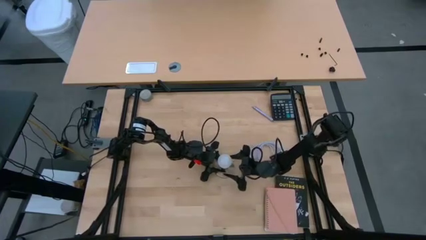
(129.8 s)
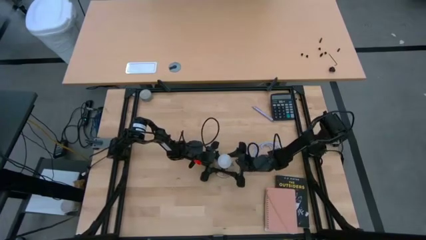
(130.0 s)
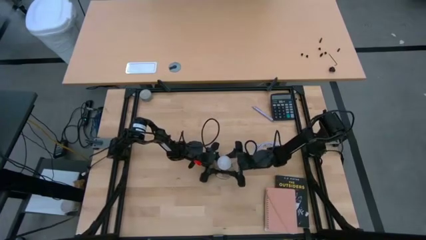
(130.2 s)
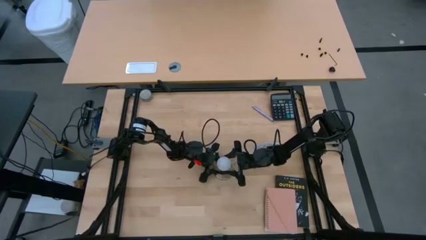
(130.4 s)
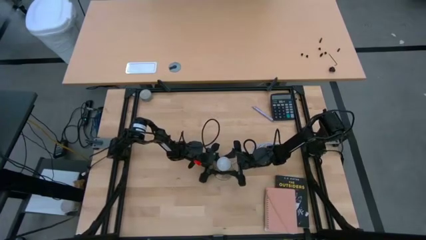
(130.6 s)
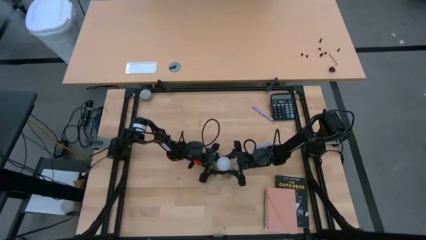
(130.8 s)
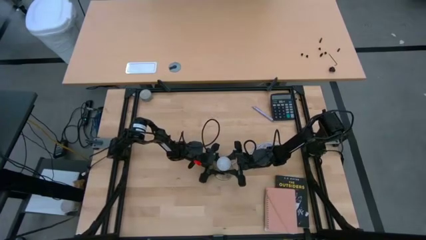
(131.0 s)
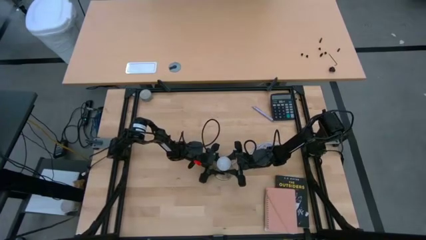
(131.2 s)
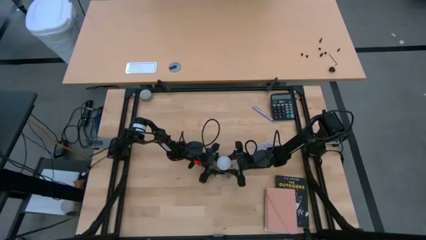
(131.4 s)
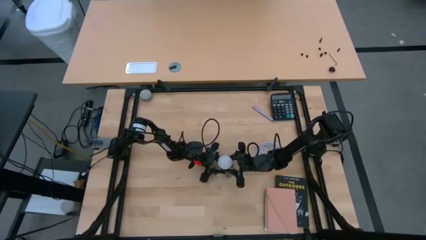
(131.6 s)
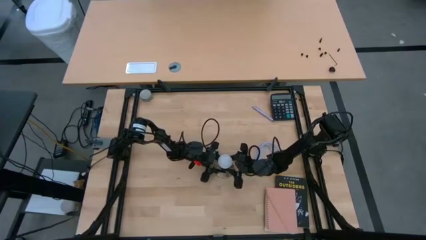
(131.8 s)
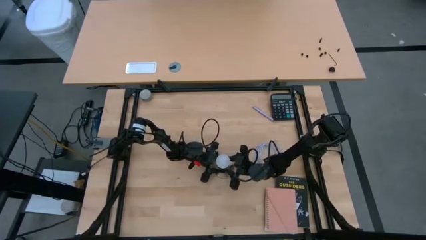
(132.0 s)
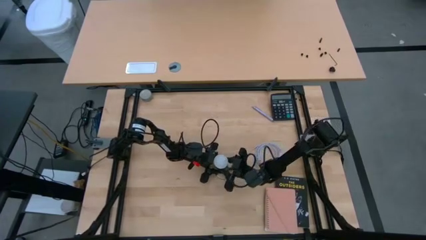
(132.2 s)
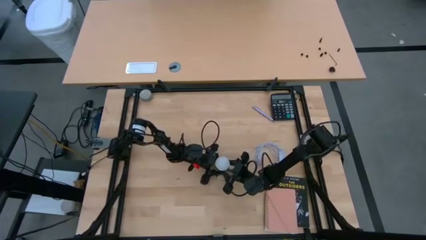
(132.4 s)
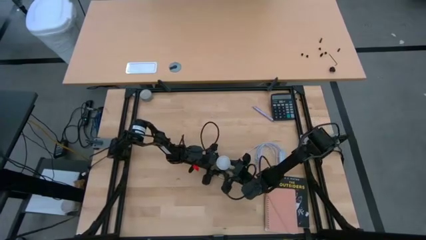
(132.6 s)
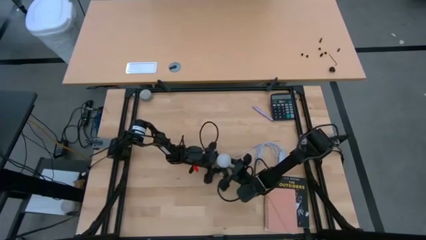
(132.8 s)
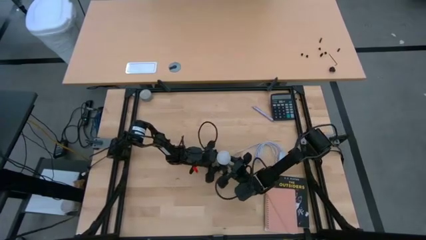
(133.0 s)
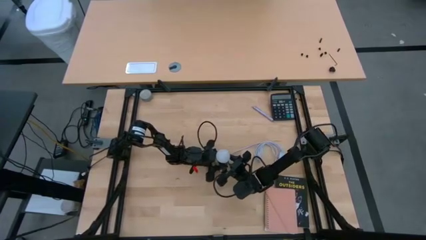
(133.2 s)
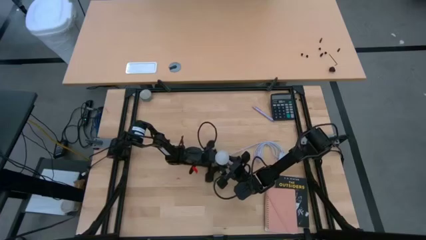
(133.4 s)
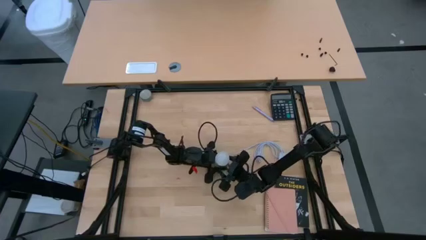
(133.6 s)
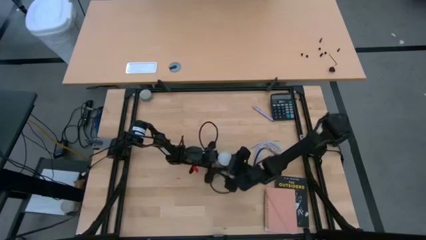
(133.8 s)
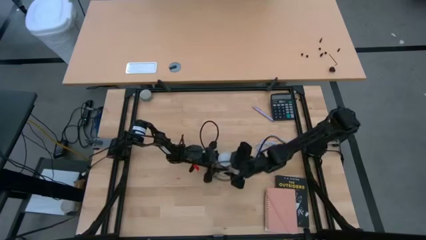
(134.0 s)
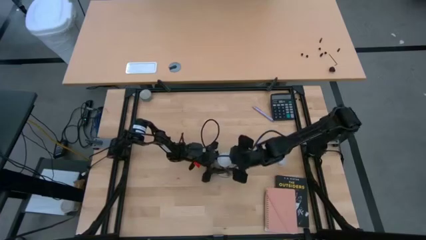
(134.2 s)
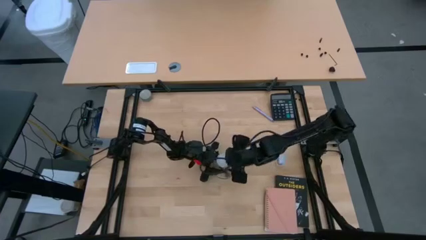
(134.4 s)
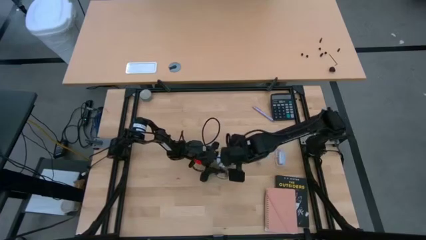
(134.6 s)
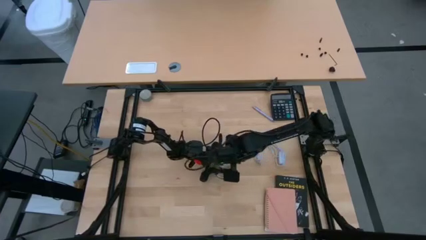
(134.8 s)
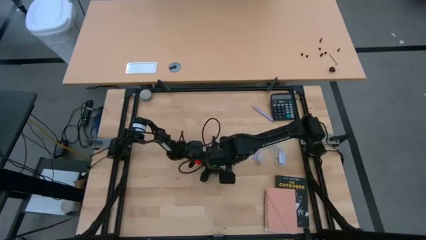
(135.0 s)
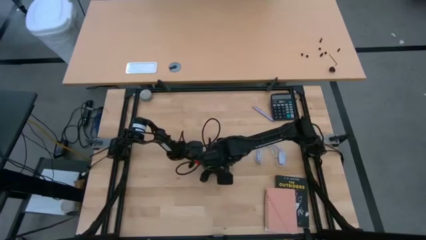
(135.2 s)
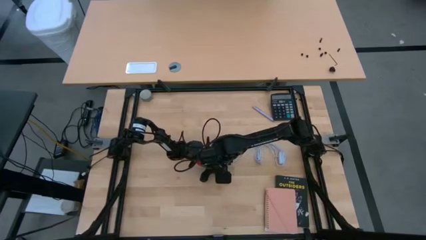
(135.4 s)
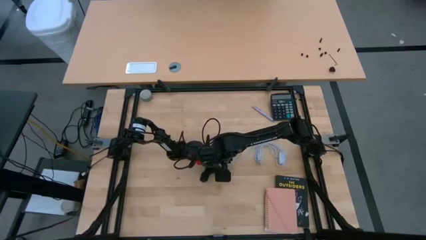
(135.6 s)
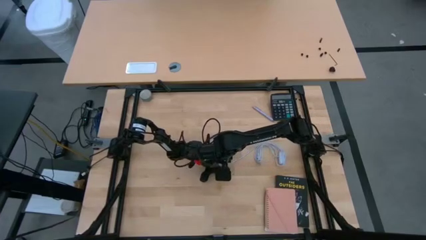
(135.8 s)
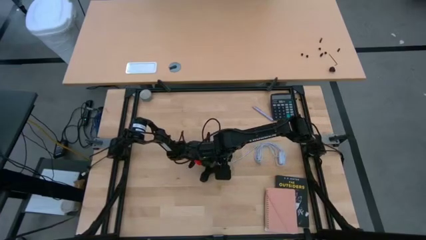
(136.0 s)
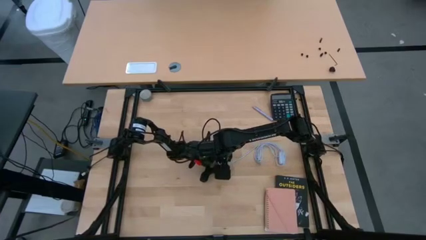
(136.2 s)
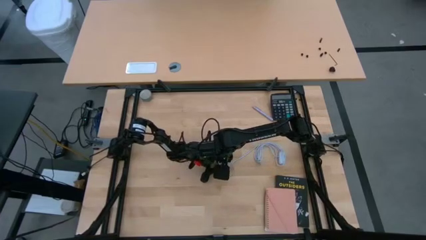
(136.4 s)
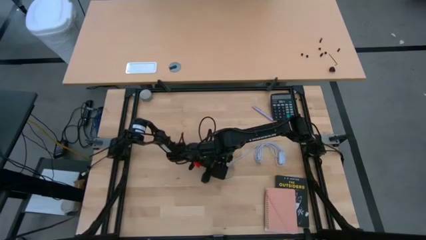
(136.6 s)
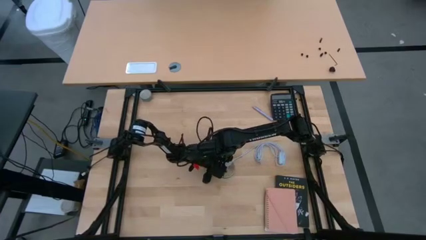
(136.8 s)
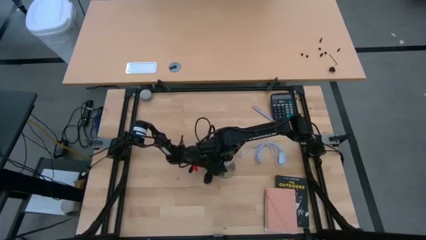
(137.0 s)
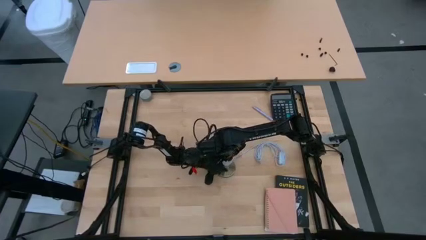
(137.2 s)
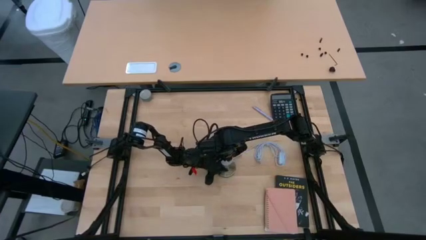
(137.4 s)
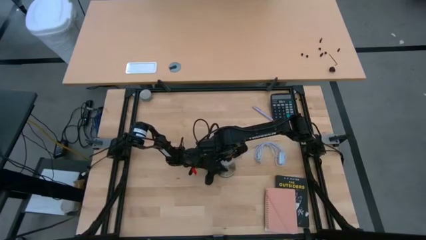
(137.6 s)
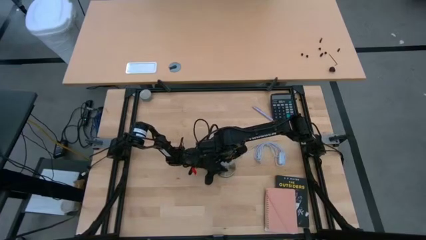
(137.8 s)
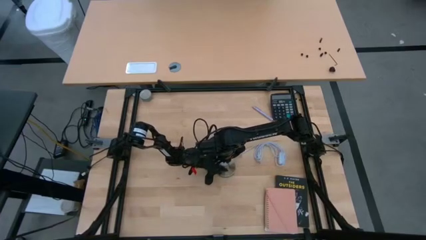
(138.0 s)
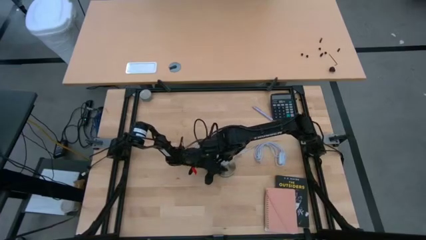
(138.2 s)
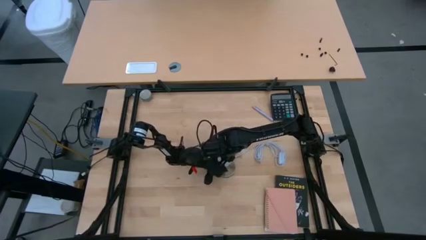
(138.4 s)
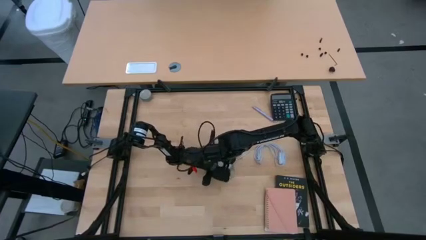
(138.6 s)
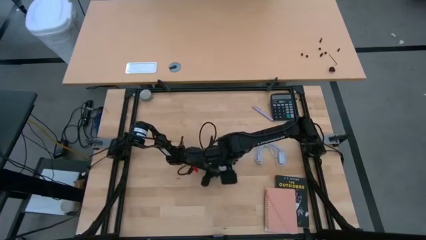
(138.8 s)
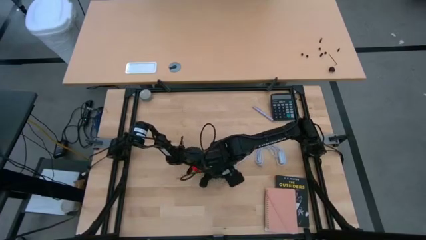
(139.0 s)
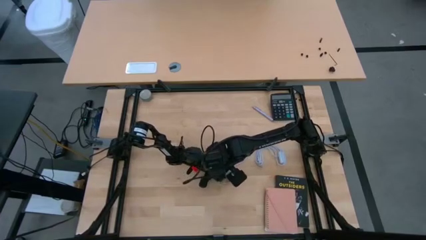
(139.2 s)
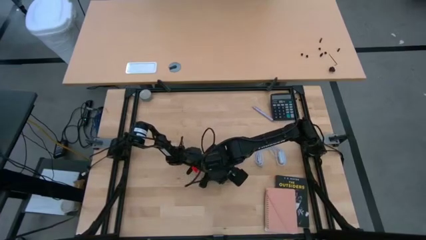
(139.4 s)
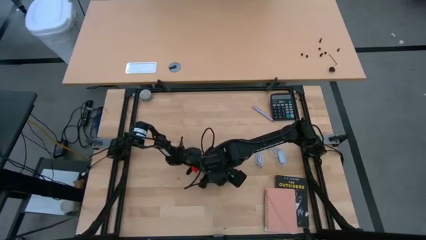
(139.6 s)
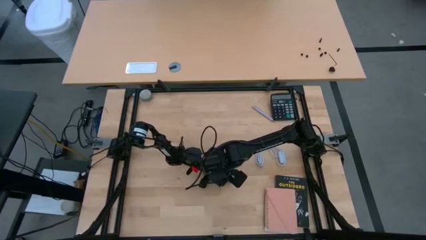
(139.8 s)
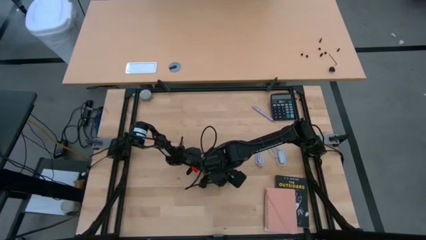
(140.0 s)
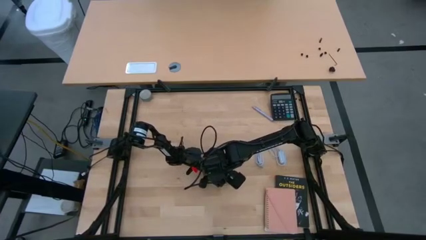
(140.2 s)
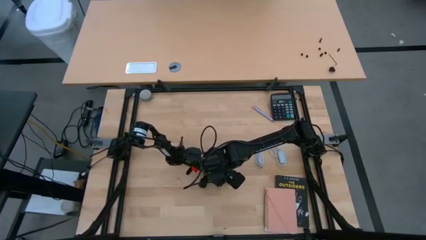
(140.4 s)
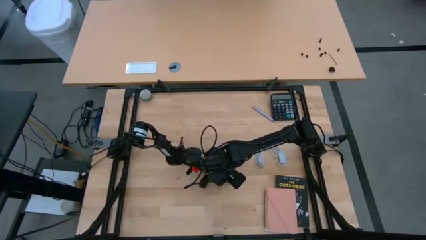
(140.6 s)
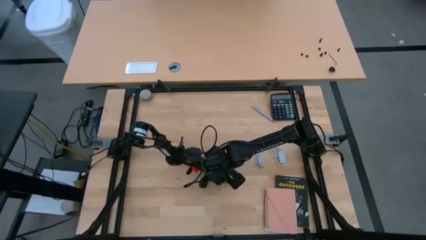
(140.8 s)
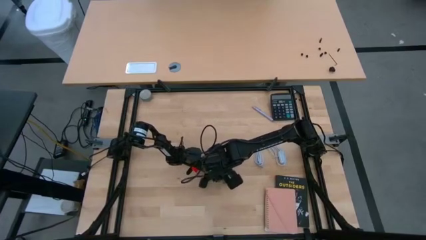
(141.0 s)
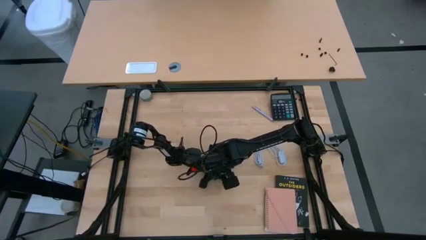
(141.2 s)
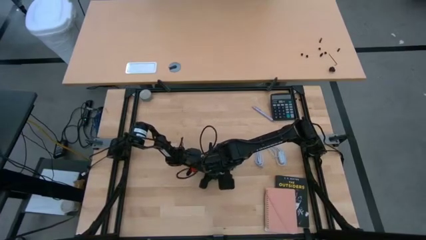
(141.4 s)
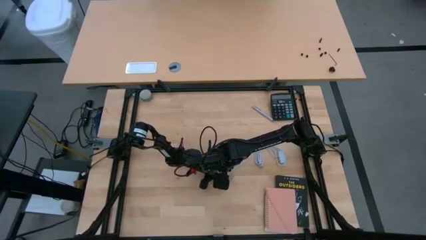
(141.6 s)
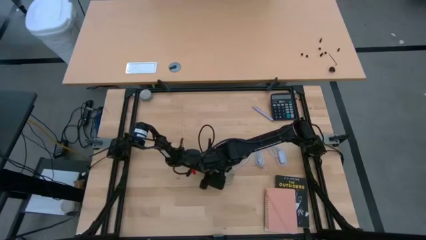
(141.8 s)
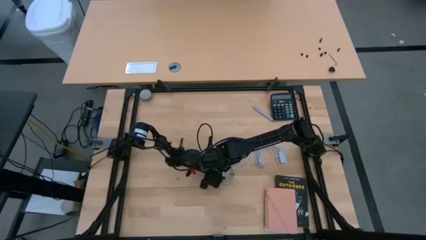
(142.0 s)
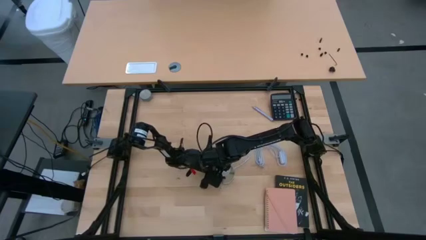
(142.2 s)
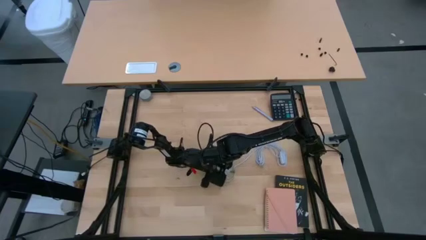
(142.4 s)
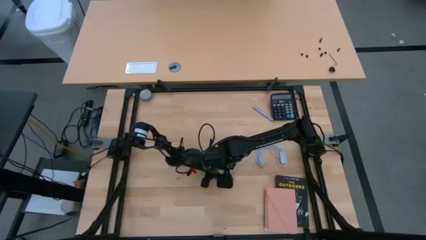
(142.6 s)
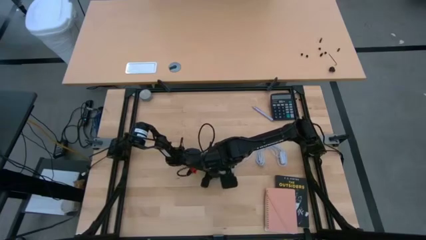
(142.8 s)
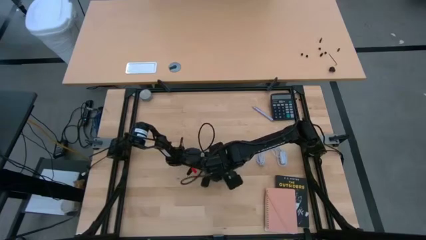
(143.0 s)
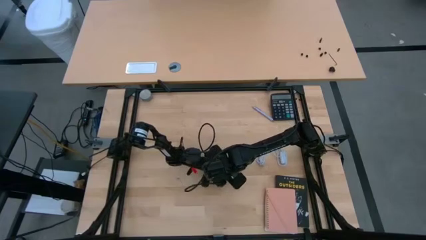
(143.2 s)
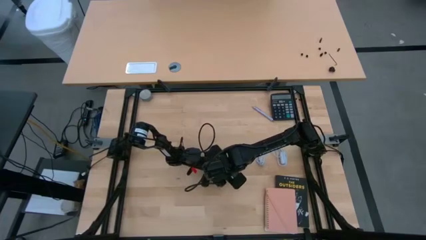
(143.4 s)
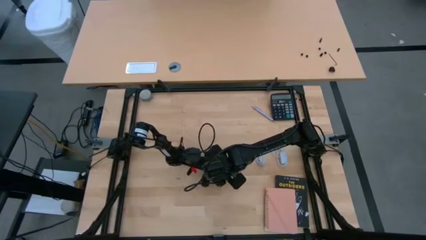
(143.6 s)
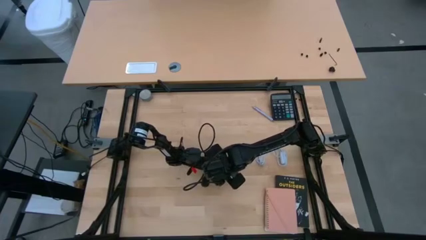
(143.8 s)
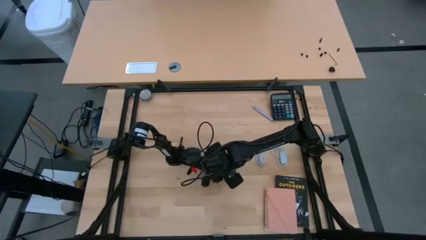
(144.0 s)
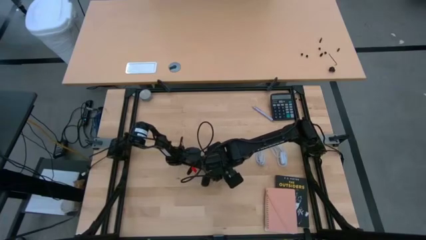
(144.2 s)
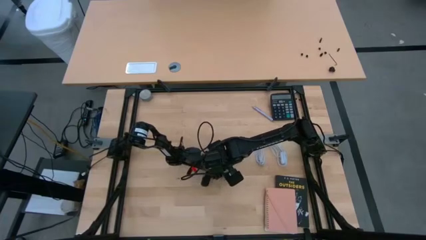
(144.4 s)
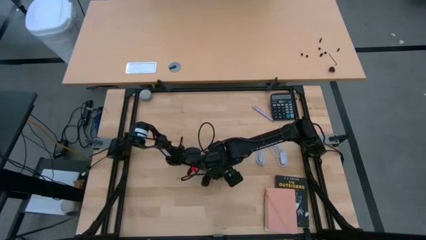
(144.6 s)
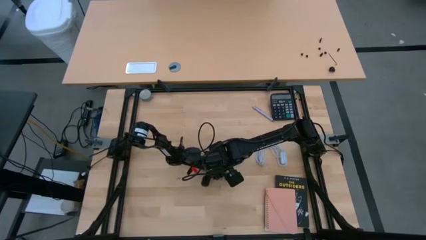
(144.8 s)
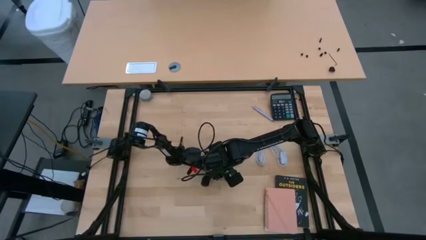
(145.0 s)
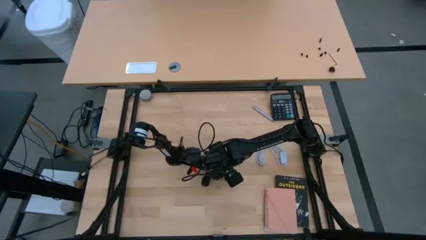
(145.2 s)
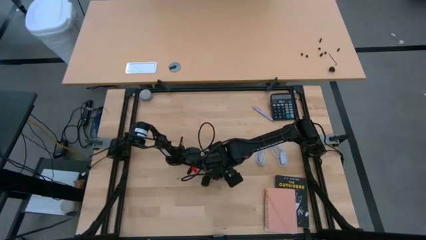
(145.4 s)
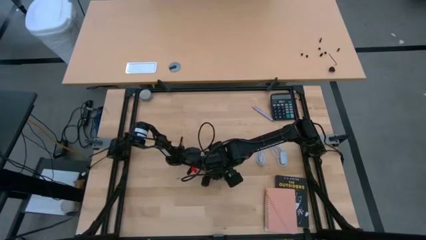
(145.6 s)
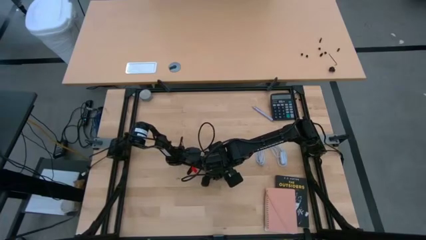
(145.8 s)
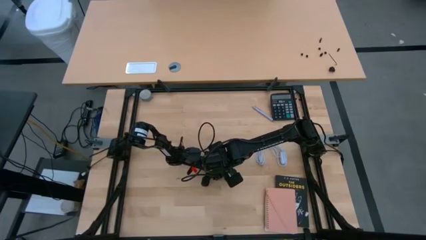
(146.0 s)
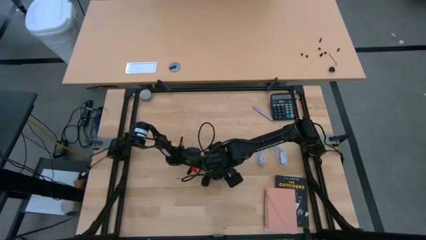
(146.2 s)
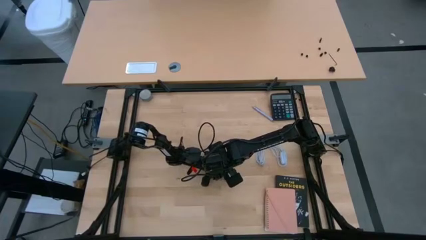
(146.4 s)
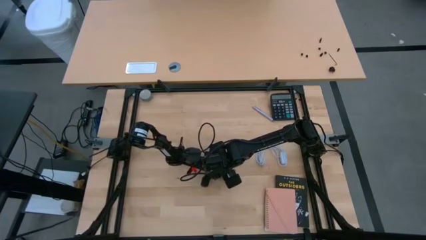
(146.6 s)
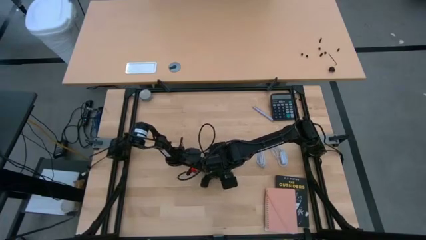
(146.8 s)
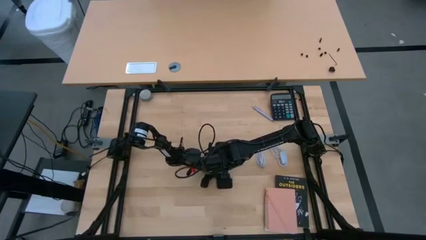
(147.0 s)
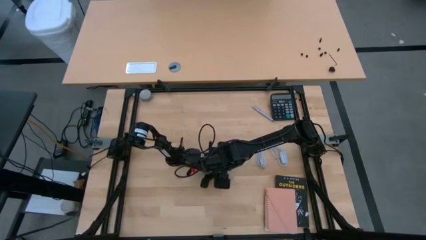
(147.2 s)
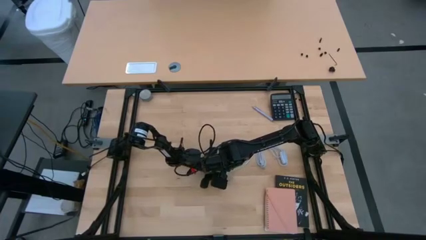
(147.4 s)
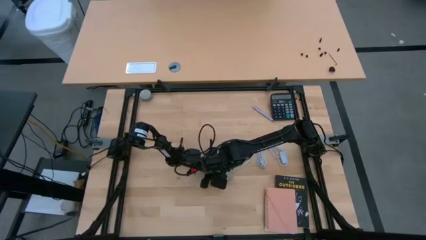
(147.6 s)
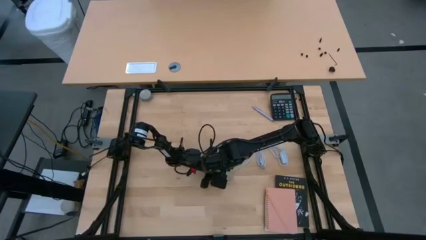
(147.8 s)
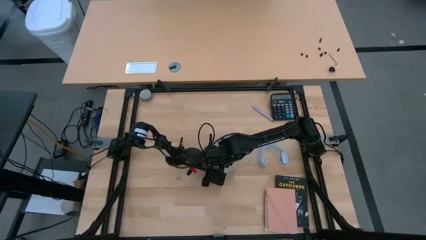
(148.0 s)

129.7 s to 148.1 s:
Task: Screw lightbulb
Insert the light bulb into the lamp
